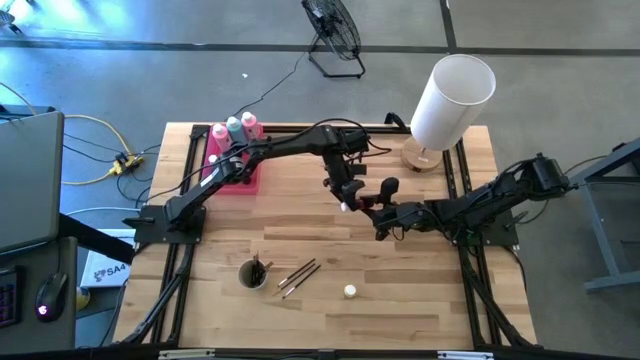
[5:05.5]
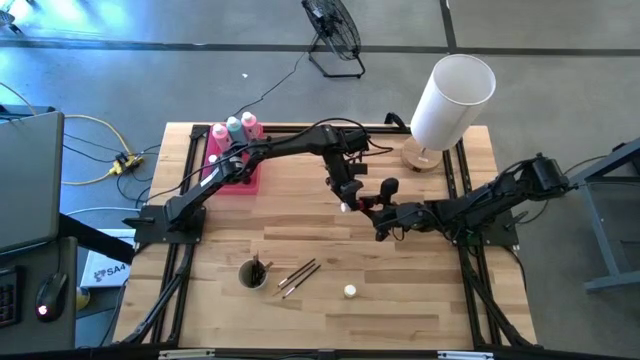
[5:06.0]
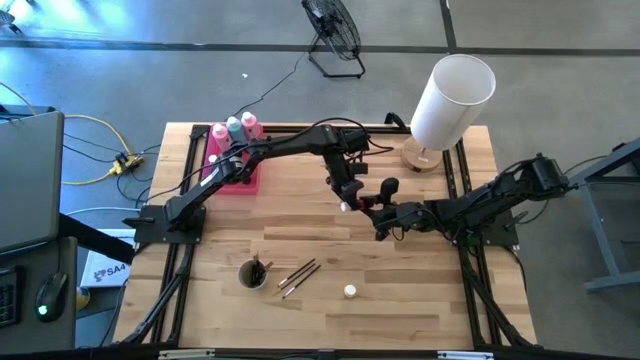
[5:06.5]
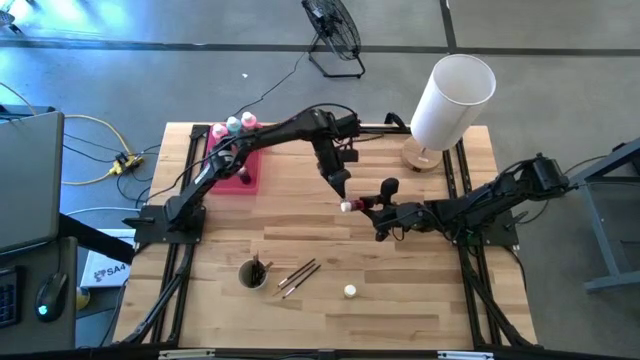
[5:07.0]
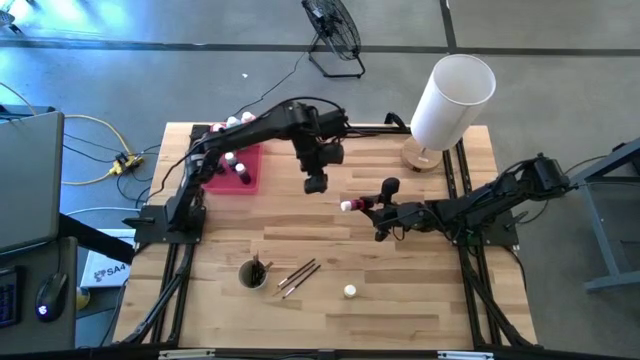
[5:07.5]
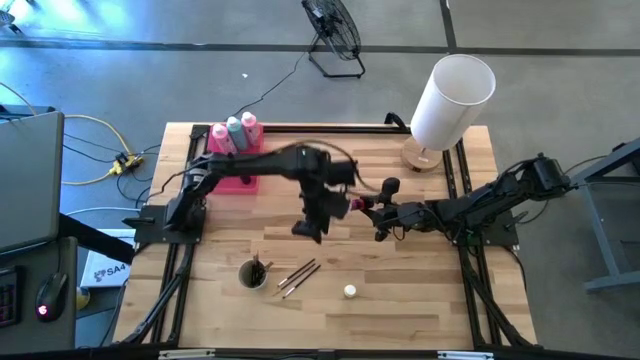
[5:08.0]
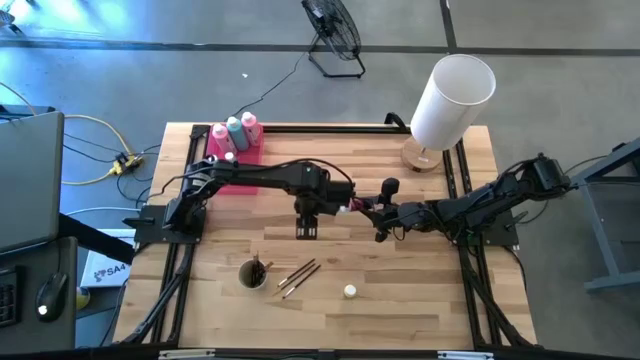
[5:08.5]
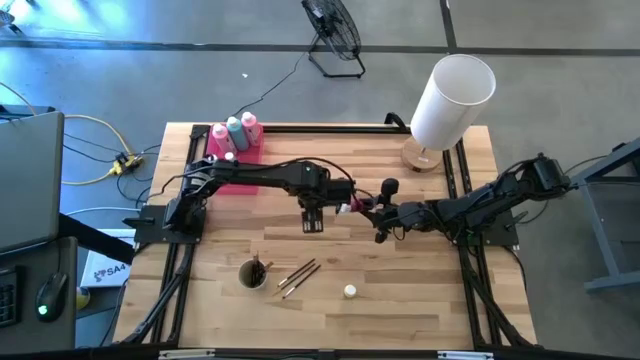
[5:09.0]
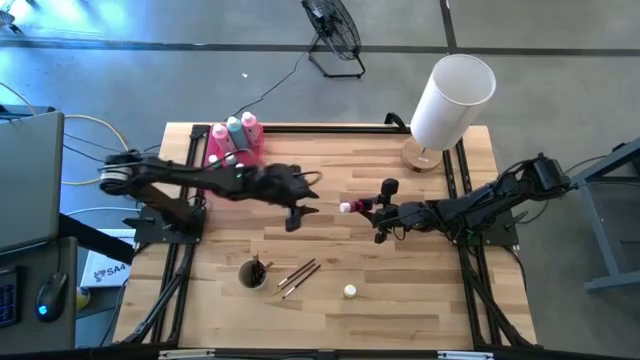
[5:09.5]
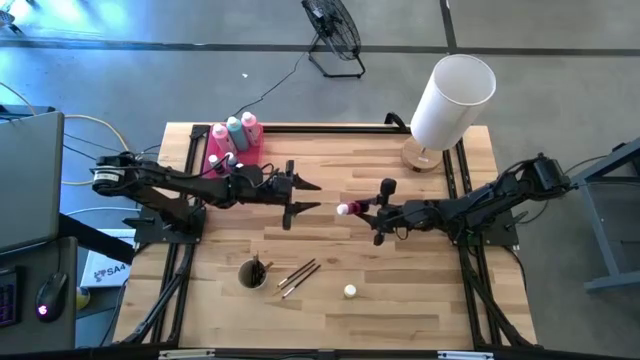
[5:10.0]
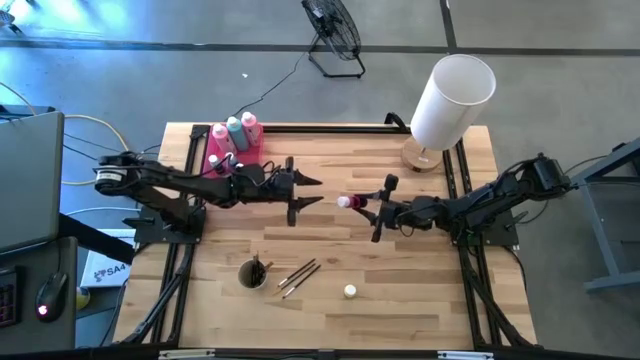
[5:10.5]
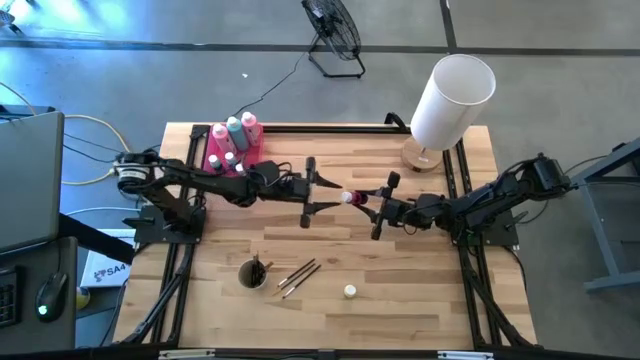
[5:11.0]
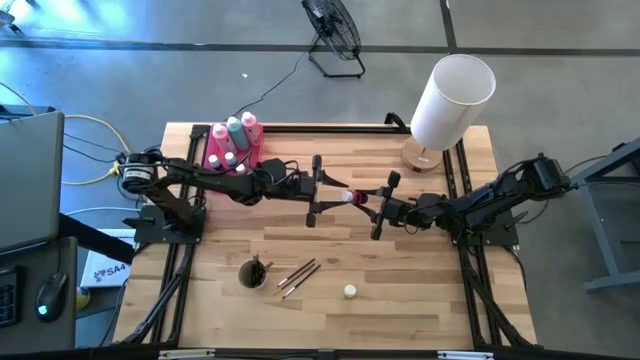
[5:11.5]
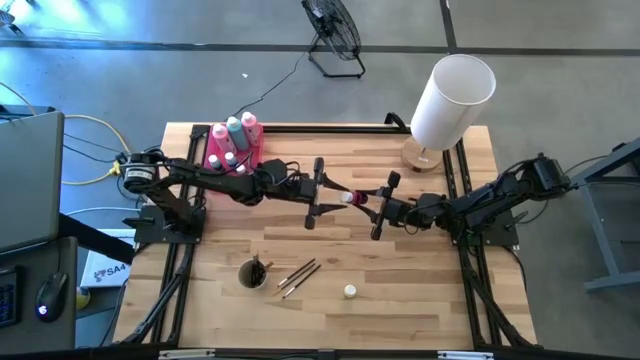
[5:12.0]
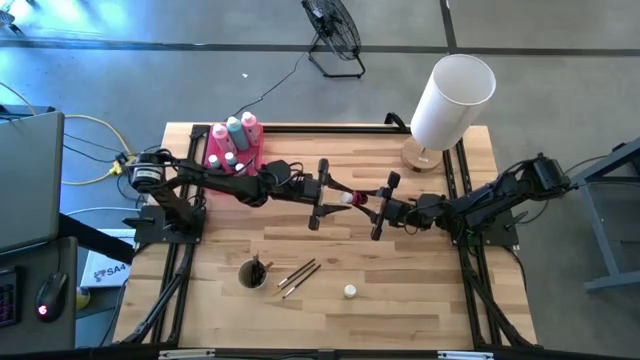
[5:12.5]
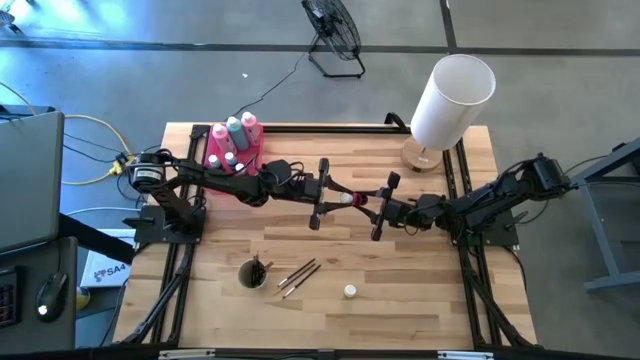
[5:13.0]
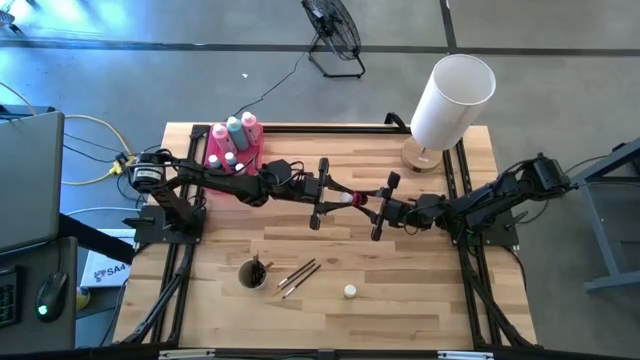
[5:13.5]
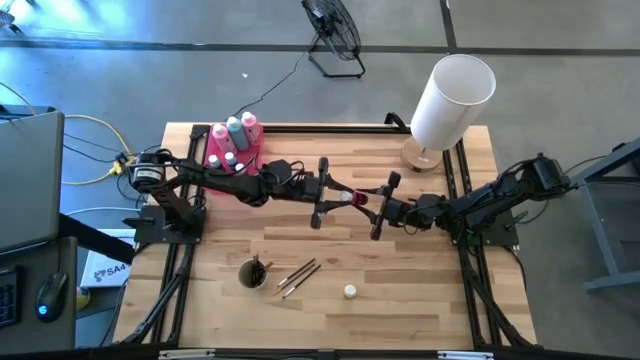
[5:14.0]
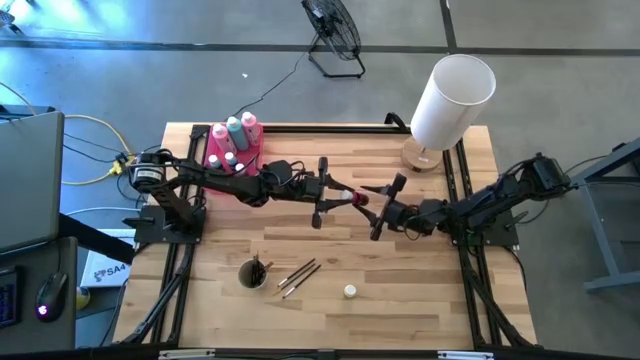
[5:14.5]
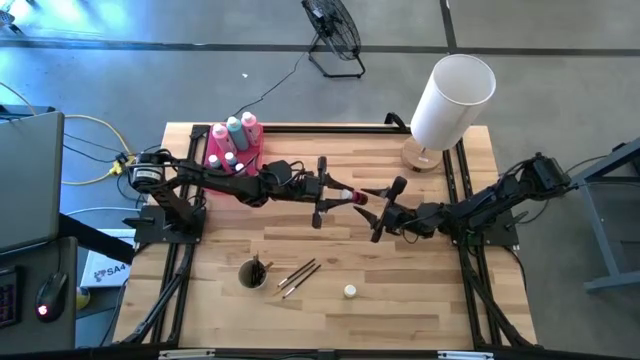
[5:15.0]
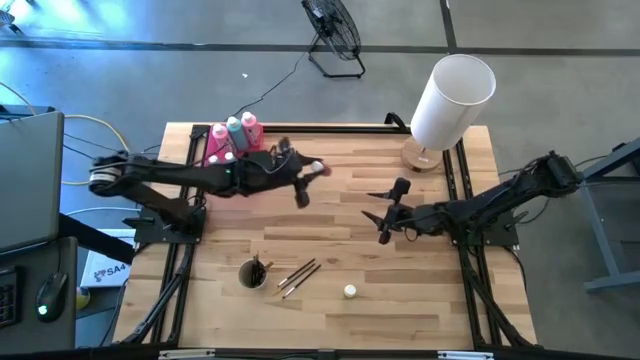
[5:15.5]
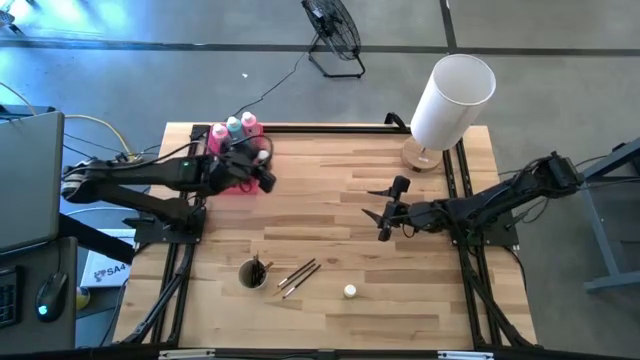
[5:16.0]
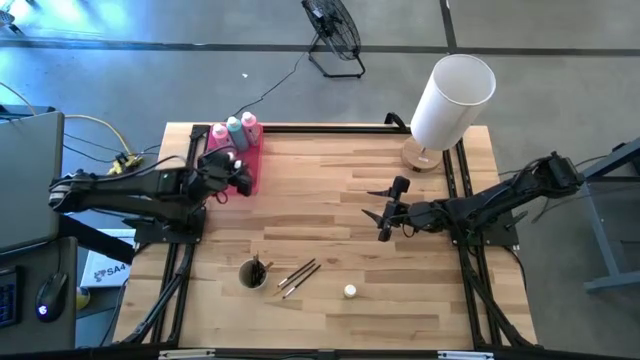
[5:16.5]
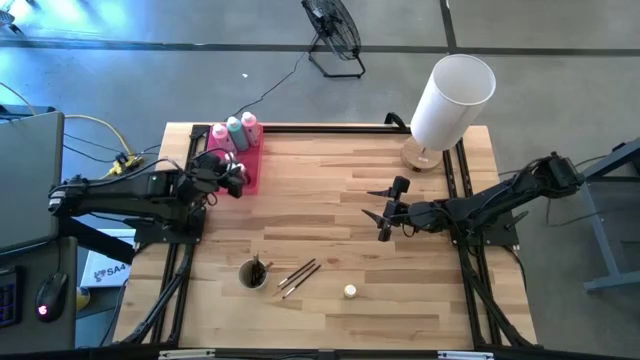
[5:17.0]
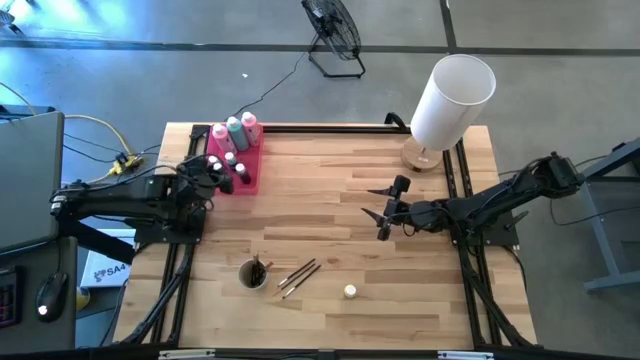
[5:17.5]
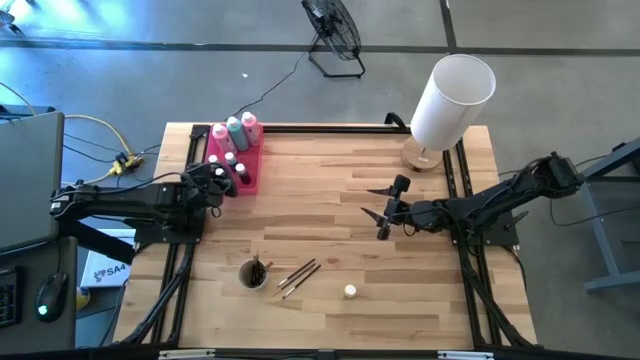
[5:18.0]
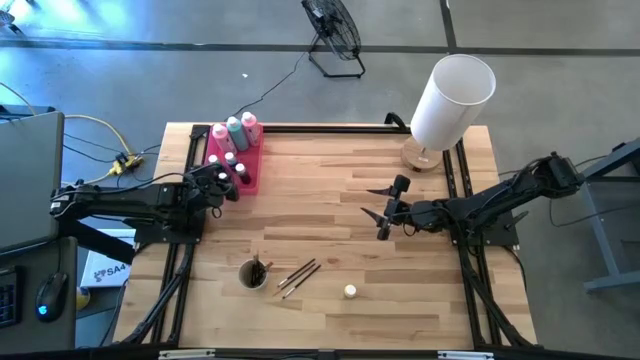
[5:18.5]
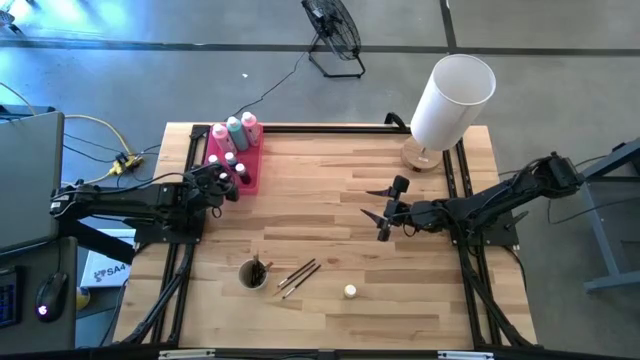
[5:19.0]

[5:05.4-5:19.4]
Task: Pick & Place Paint Supplies
Put the small pink paint bottle into the pink bin
